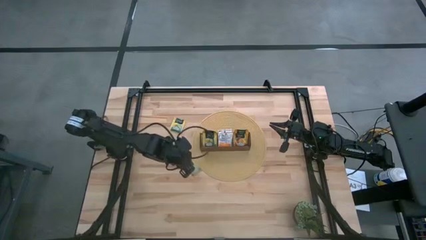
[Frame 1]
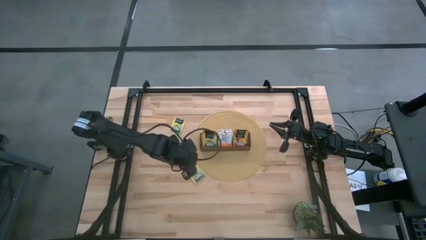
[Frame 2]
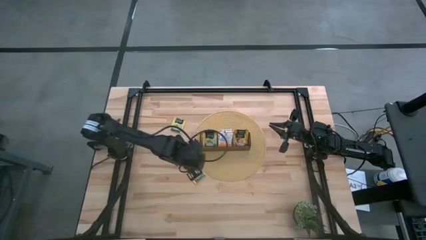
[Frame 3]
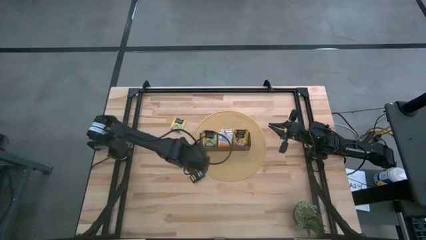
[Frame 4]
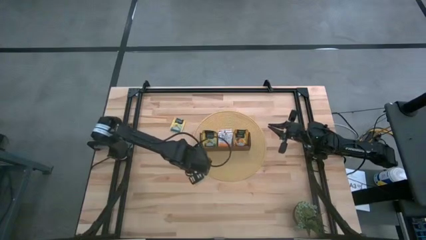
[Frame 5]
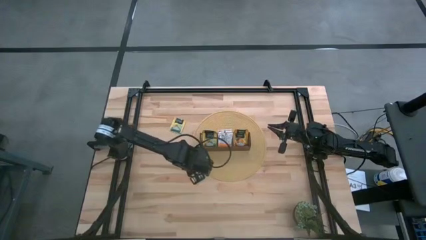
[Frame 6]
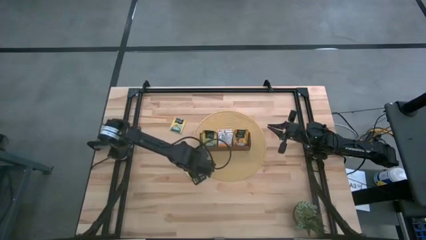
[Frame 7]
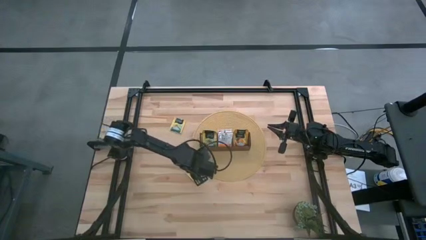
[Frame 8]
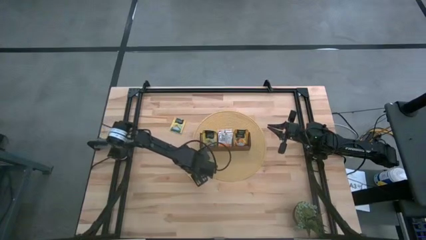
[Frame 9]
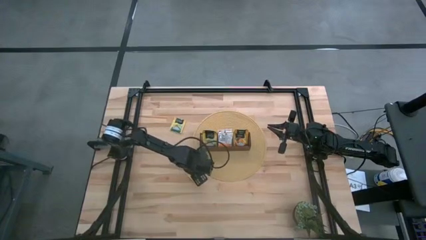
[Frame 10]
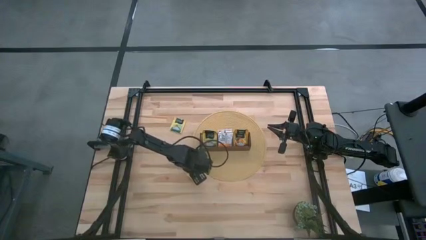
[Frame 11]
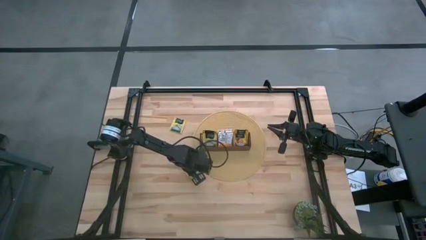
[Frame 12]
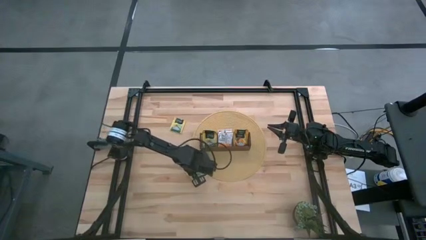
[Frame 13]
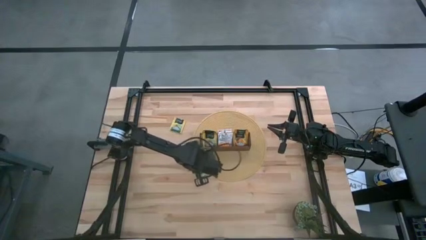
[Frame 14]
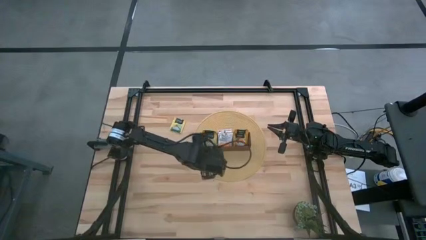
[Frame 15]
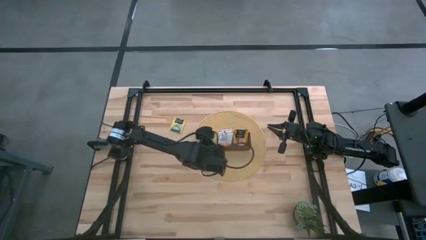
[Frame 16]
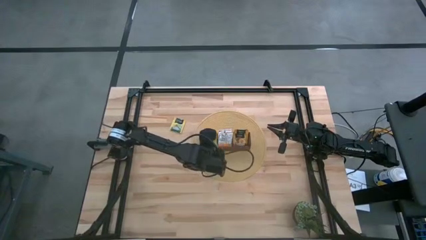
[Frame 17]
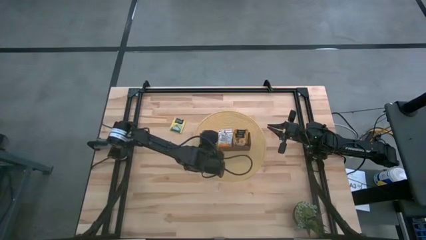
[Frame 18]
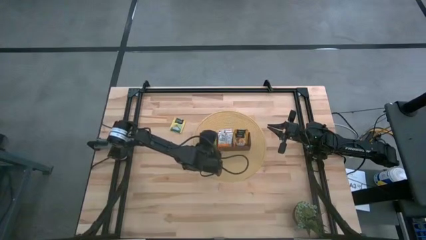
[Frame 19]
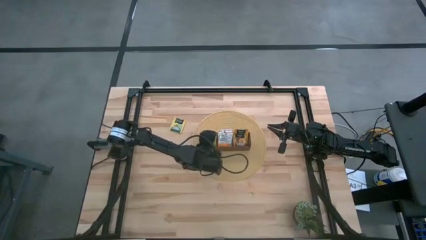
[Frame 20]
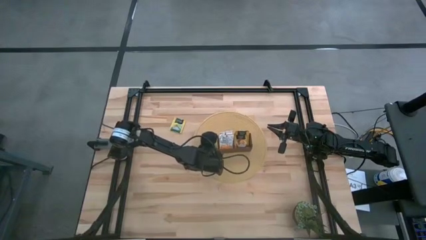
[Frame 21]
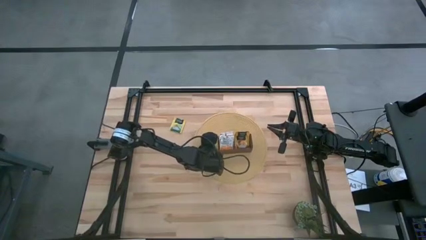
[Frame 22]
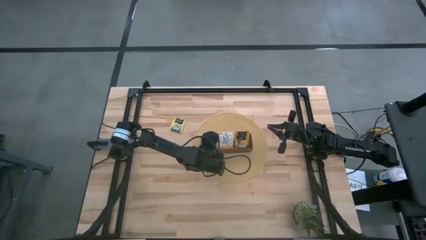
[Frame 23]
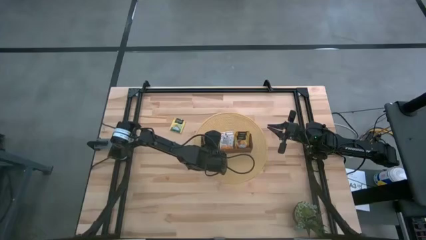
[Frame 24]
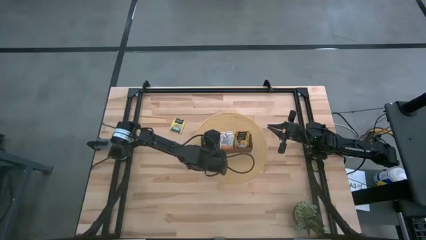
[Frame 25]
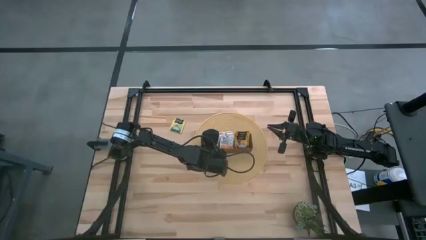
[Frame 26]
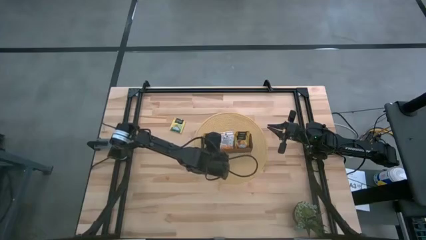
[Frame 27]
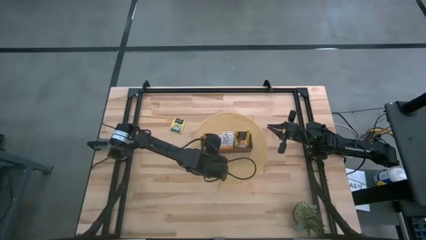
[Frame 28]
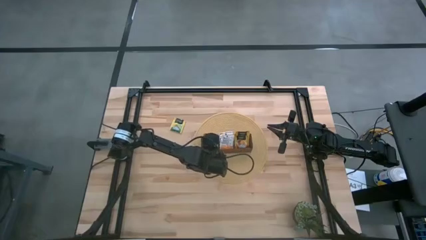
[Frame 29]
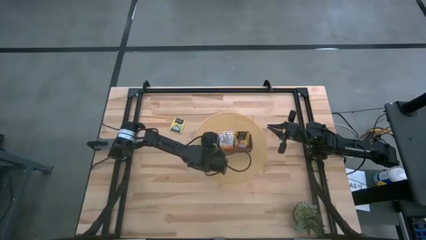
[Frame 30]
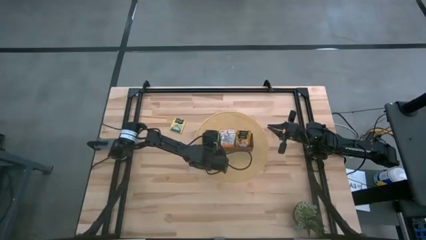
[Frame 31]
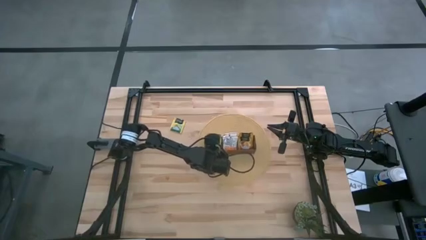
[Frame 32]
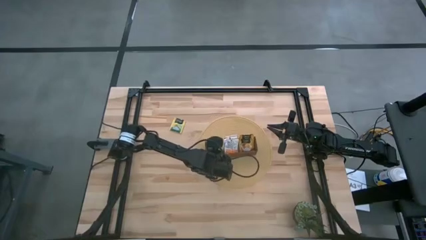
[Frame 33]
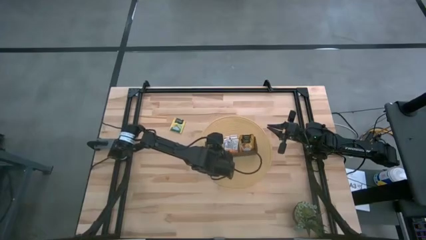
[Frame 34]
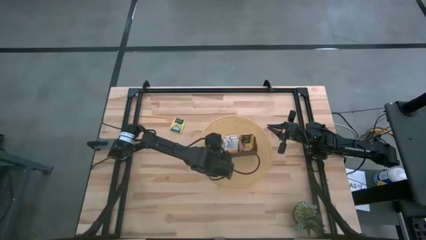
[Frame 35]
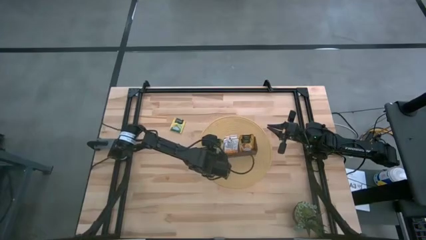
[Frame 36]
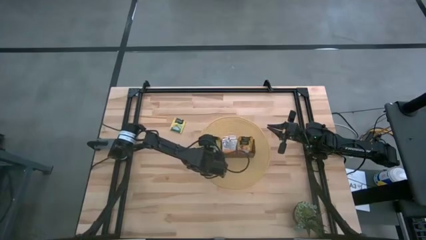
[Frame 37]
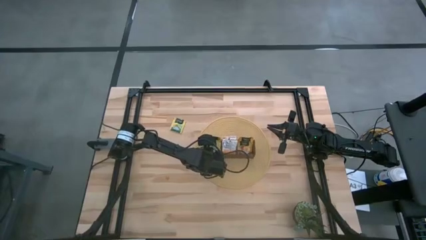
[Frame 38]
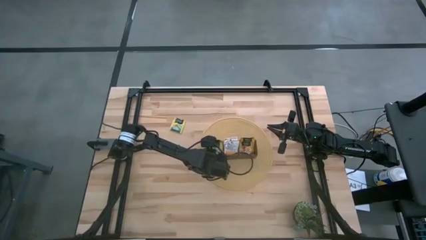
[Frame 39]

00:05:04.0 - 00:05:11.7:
Task: Pick & Place Tea
Put the yellow tea bag into the left section of the wooden organizer

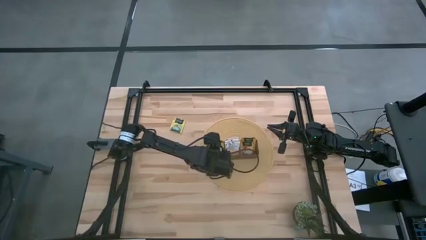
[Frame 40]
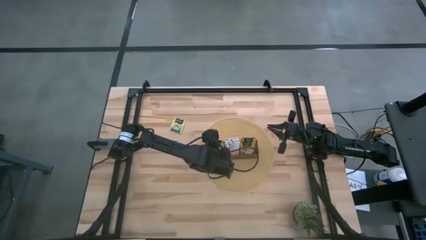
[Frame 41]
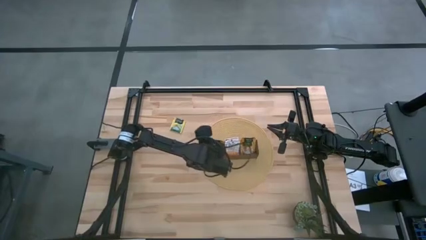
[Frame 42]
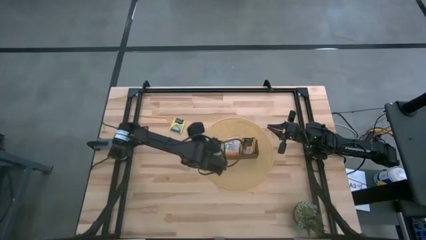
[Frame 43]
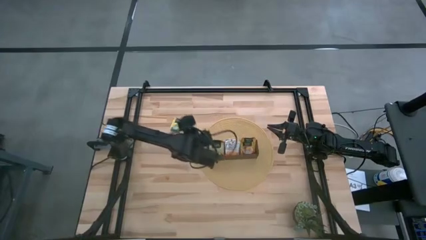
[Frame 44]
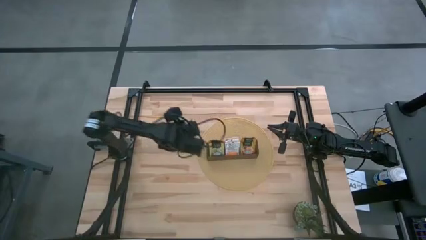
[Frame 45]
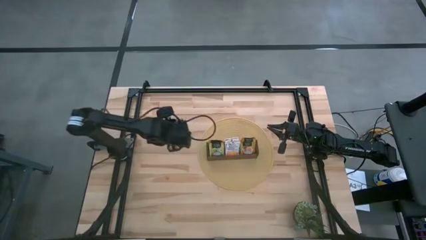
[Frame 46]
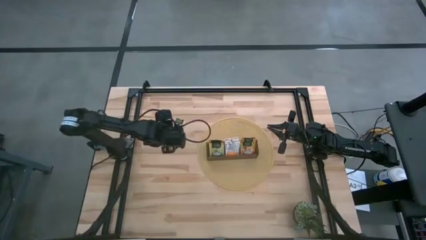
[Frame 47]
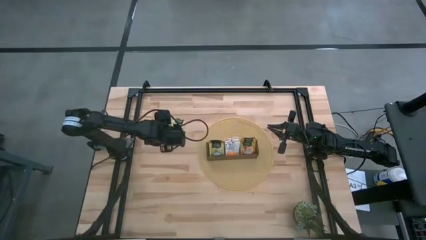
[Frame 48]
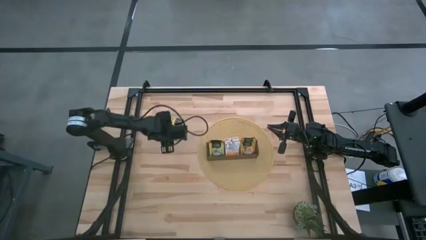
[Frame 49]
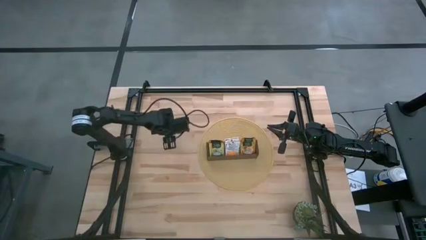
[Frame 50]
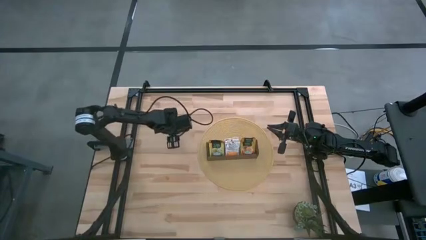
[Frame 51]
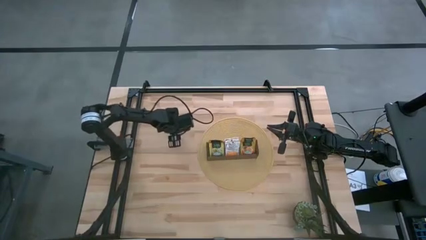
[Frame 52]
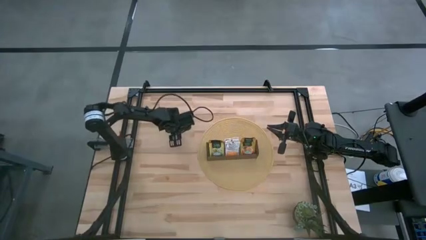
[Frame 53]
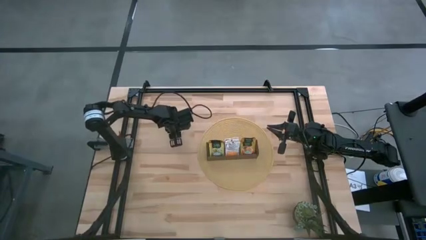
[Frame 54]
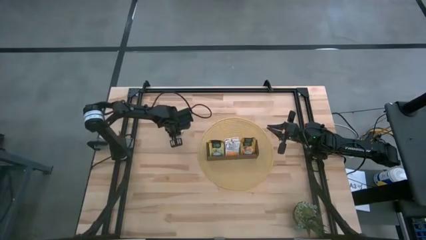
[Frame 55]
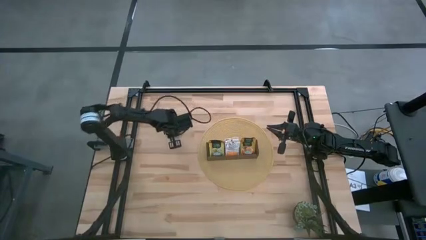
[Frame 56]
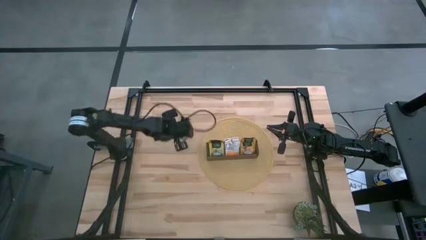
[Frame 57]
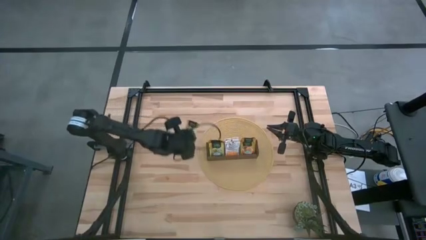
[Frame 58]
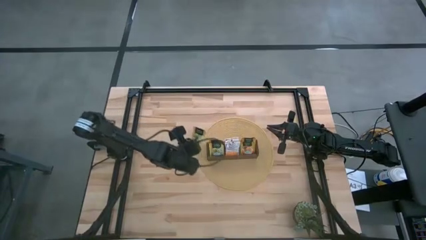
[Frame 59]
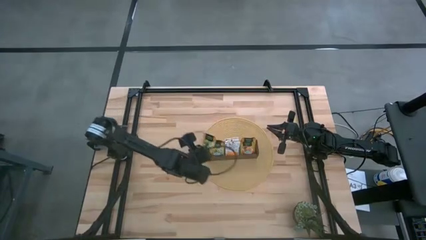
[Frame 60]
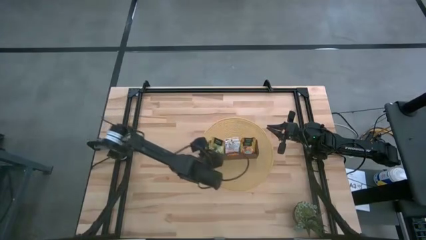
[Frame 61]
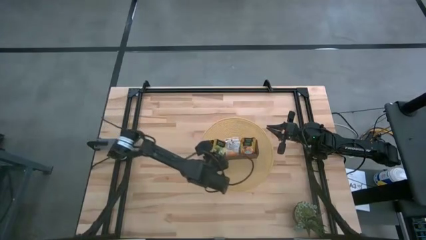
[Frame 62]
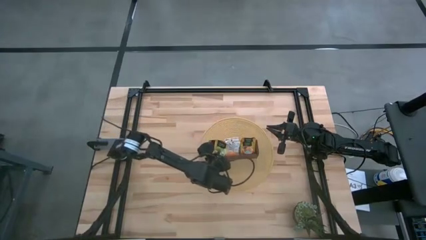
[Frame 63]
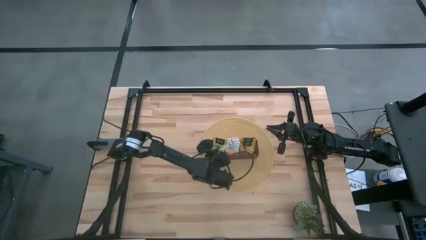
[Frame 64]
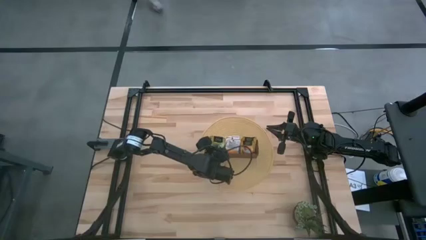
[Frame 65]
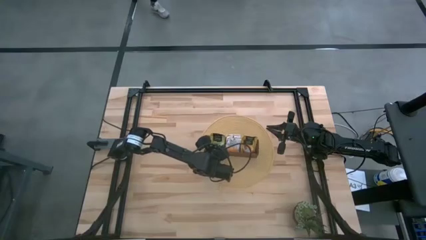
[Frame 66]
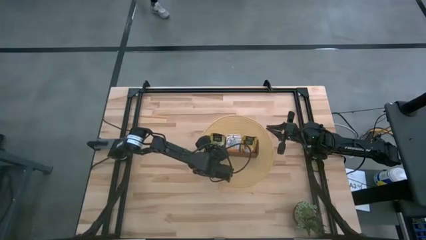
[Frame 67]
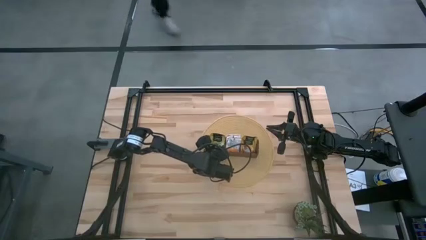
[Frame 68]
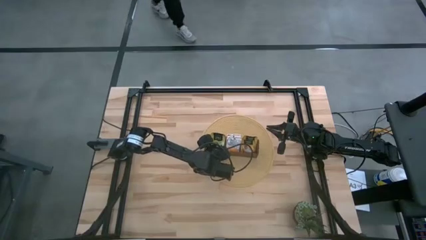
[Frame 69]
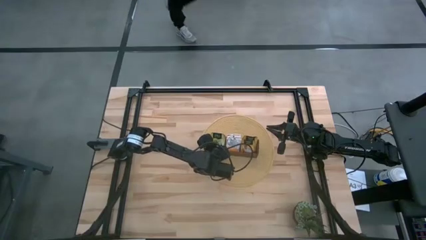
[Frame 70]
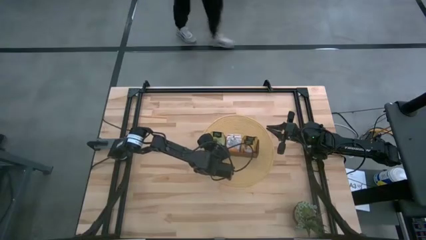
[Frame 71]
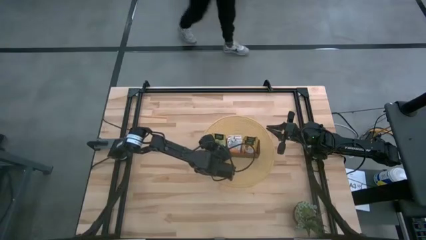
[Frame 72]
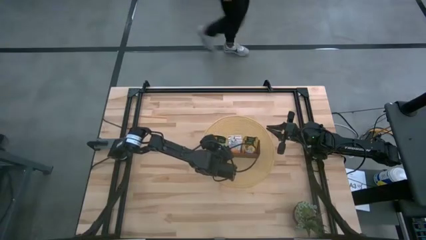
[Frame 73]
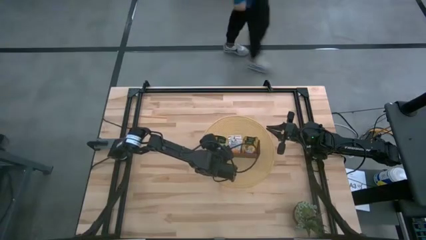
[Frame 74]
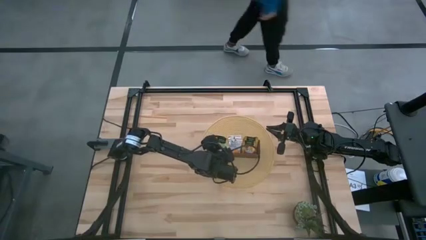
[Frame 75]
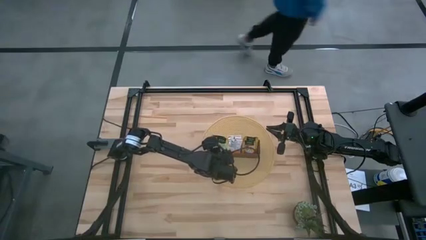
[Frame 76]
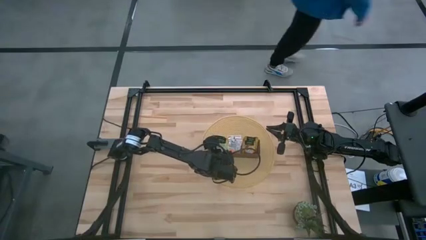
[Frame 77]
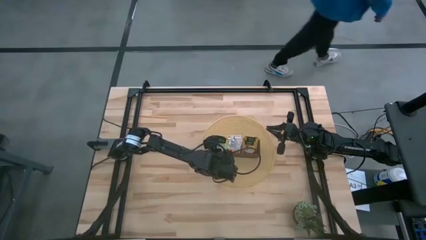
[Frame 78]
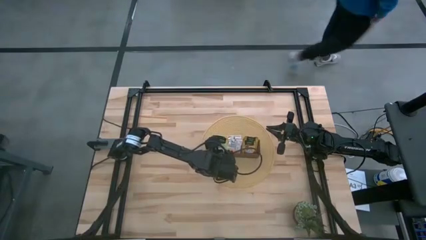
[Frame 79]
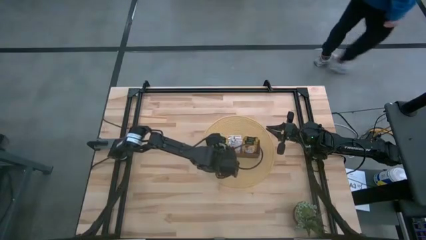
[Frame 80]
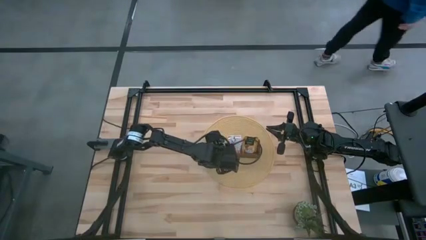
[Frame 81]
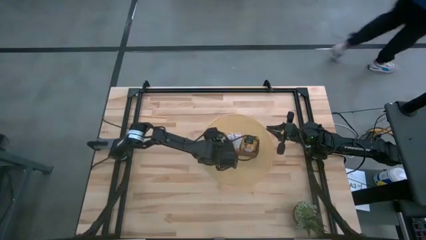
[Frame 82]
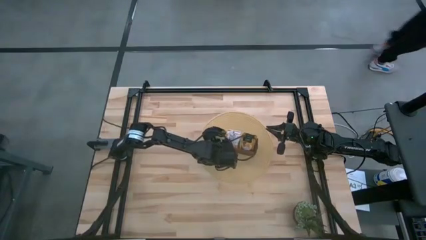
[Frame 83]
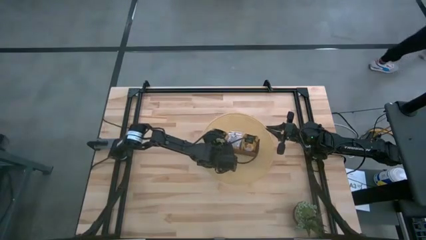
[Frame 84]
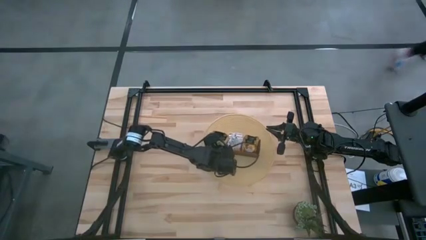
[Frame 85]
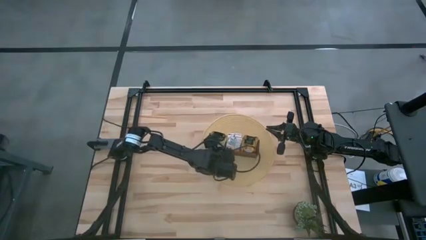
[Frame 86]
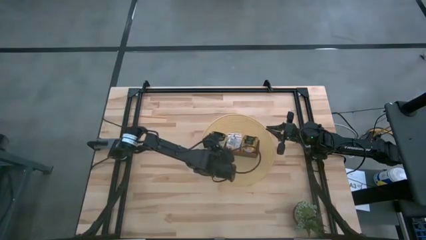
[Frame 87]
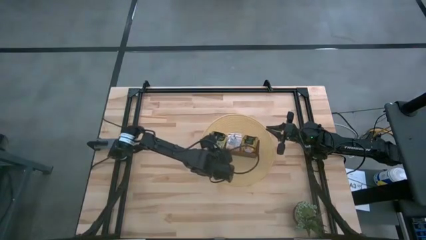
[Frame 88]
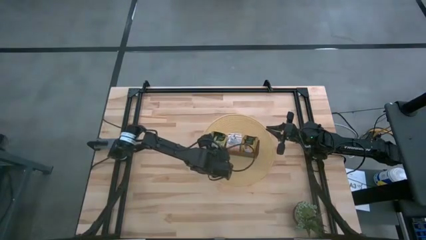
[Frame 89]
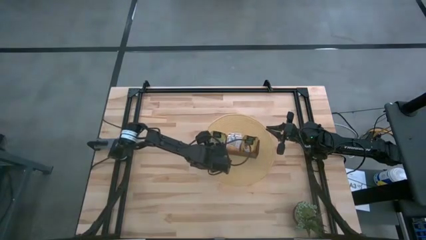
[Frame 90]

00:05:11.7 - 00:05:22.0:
Put the yellow tea bag into the left section of the wooden organizer
